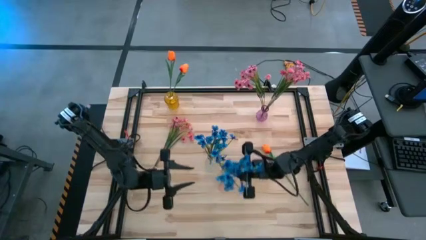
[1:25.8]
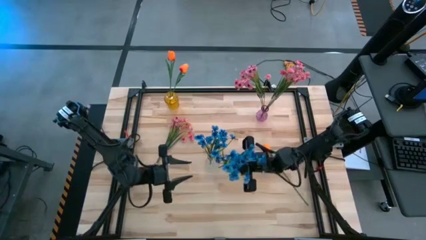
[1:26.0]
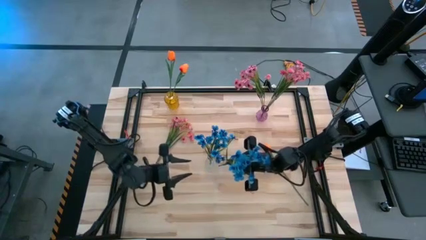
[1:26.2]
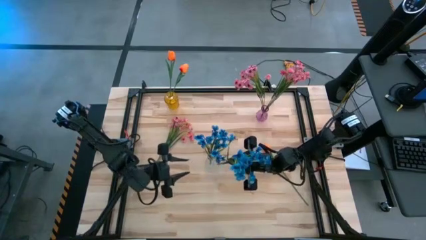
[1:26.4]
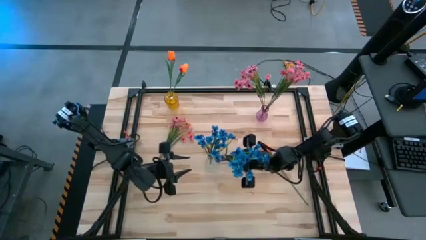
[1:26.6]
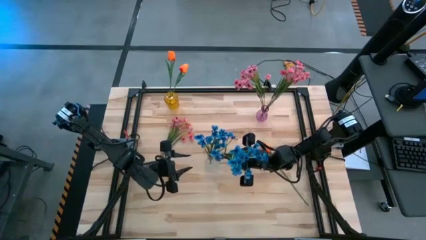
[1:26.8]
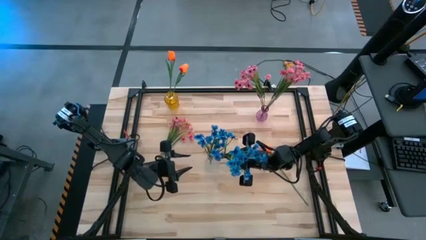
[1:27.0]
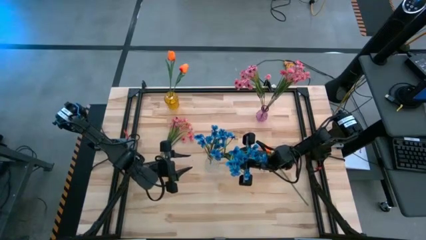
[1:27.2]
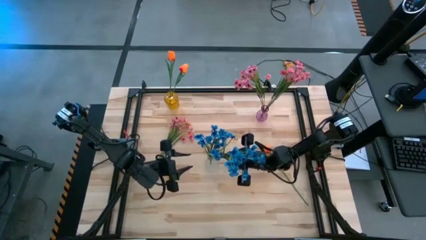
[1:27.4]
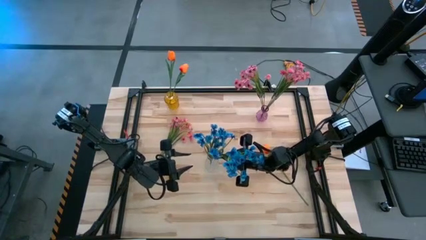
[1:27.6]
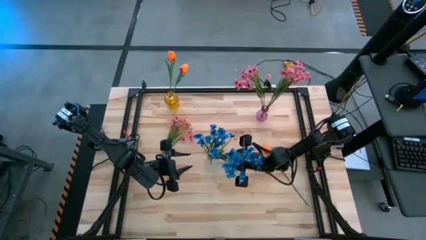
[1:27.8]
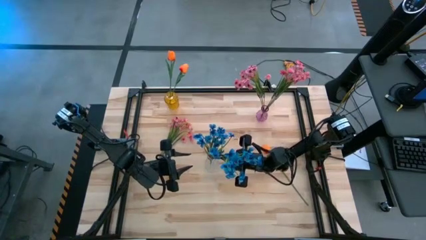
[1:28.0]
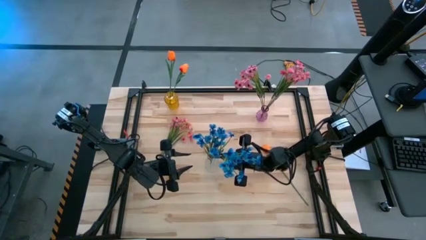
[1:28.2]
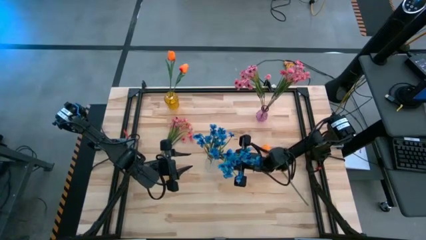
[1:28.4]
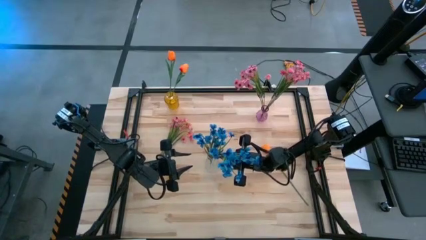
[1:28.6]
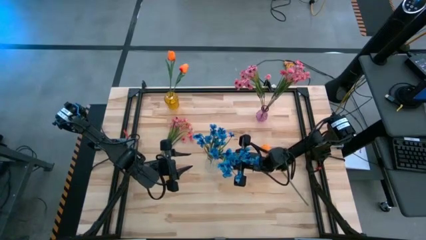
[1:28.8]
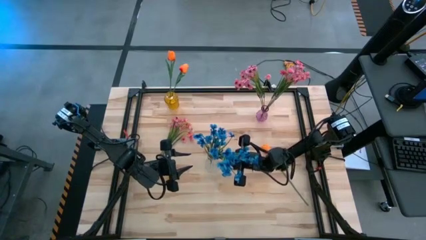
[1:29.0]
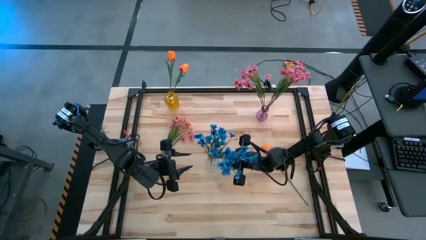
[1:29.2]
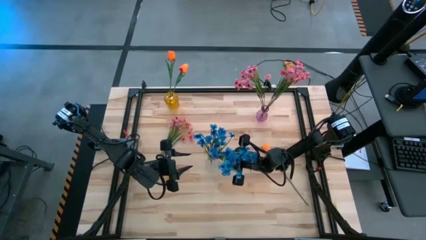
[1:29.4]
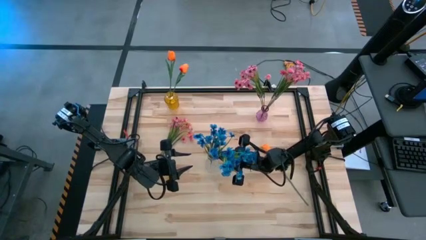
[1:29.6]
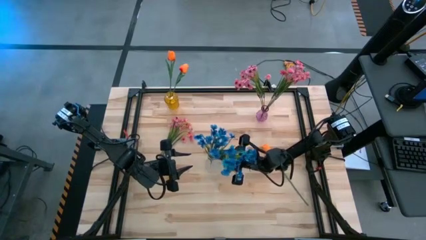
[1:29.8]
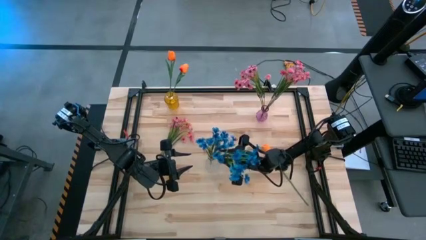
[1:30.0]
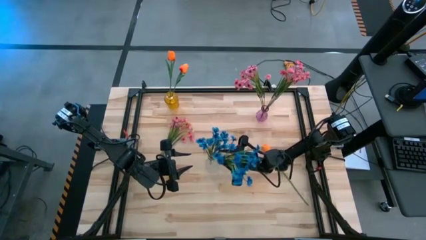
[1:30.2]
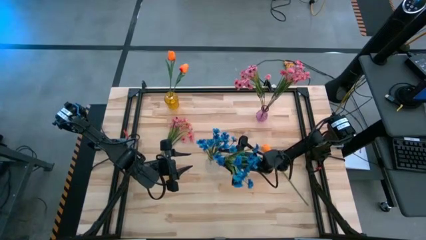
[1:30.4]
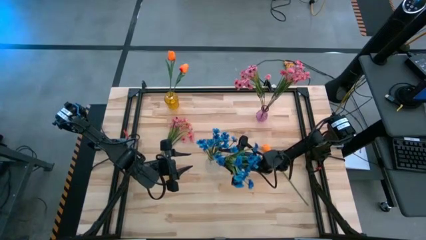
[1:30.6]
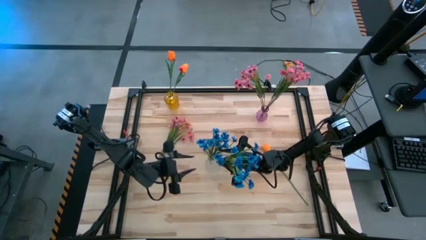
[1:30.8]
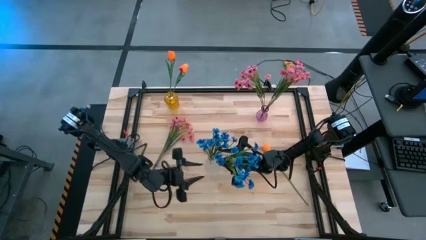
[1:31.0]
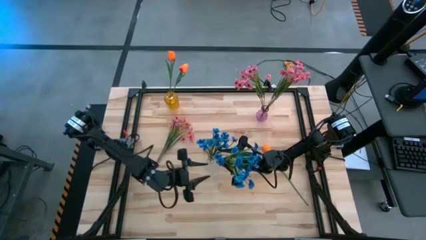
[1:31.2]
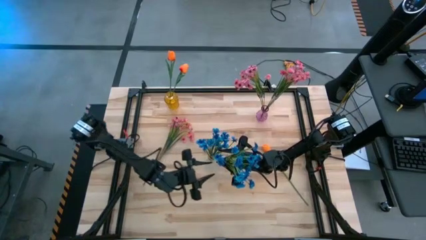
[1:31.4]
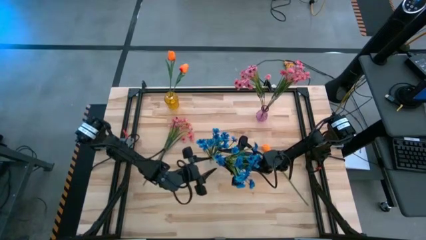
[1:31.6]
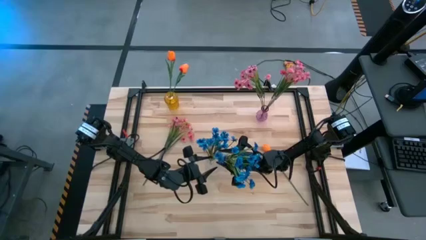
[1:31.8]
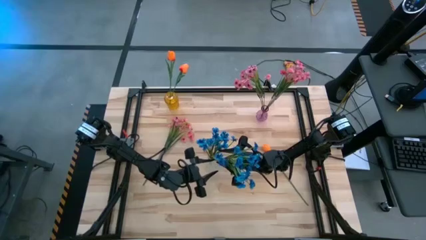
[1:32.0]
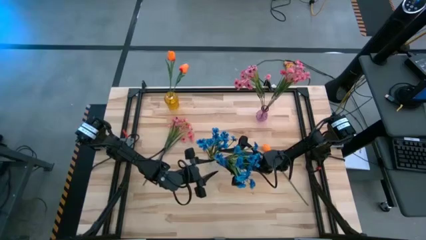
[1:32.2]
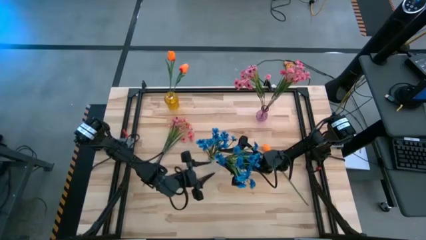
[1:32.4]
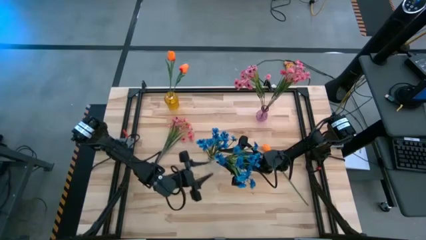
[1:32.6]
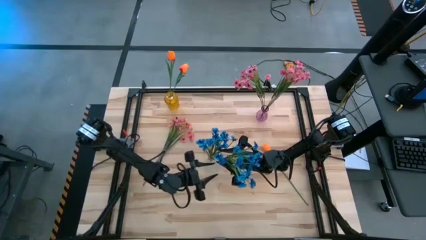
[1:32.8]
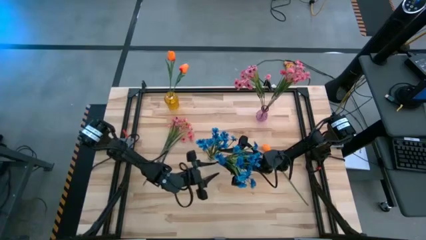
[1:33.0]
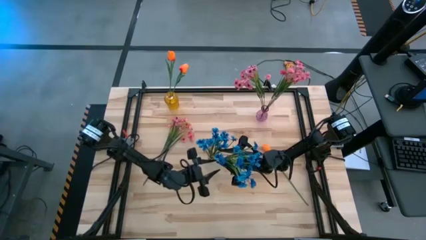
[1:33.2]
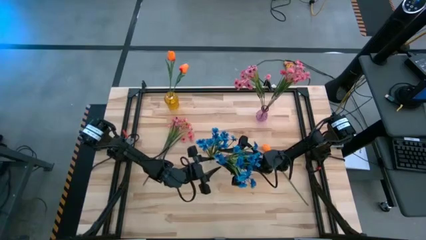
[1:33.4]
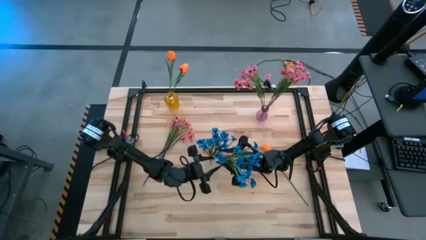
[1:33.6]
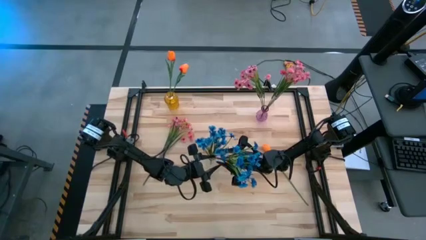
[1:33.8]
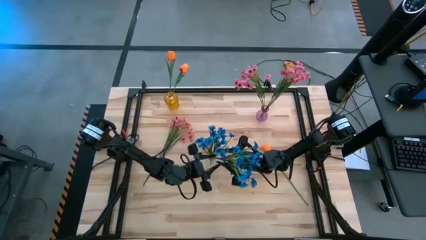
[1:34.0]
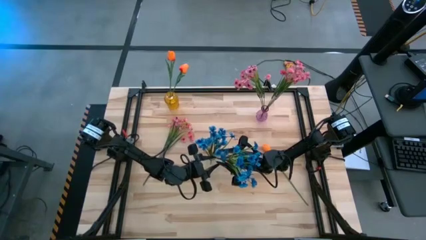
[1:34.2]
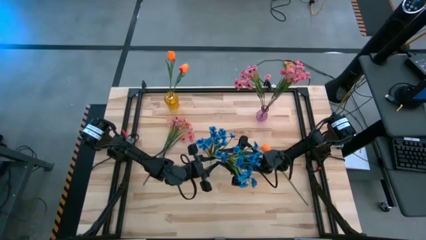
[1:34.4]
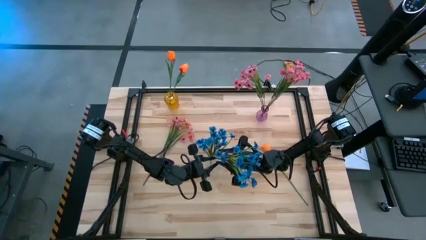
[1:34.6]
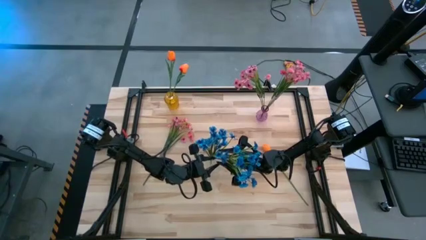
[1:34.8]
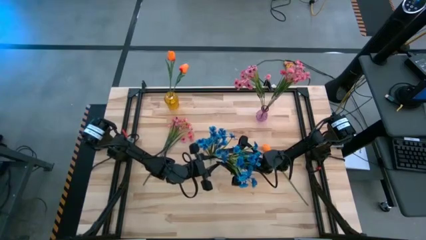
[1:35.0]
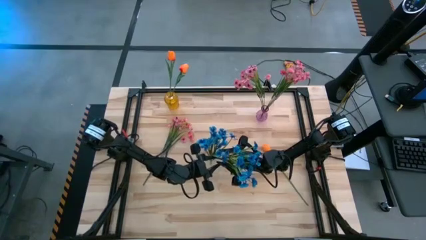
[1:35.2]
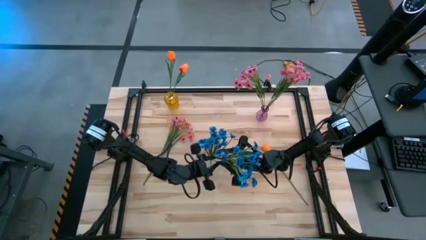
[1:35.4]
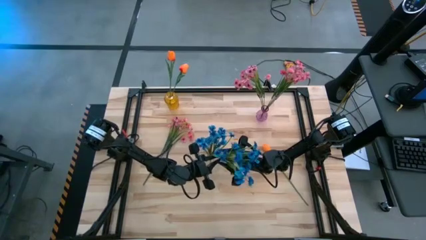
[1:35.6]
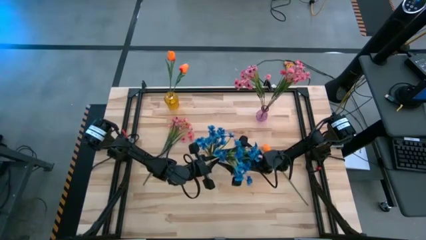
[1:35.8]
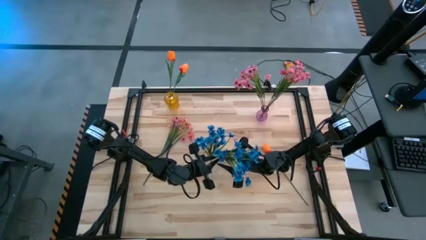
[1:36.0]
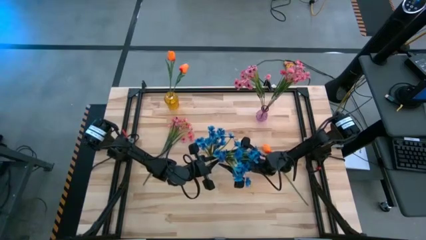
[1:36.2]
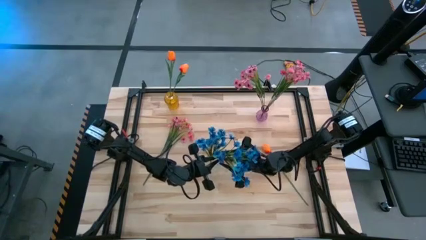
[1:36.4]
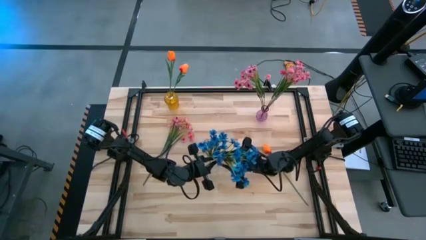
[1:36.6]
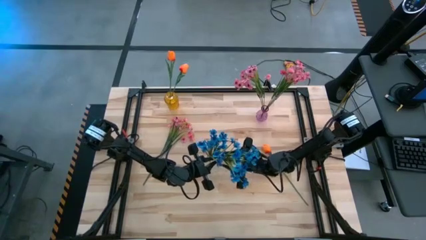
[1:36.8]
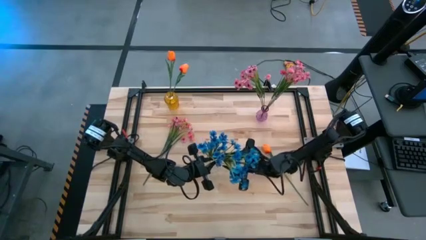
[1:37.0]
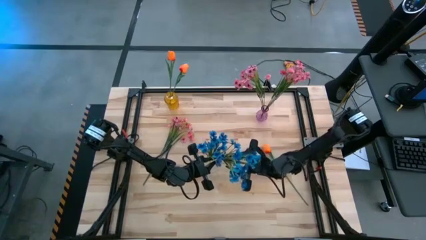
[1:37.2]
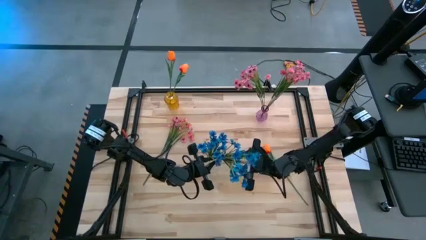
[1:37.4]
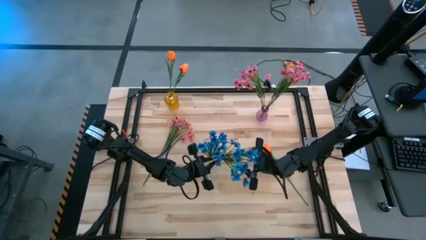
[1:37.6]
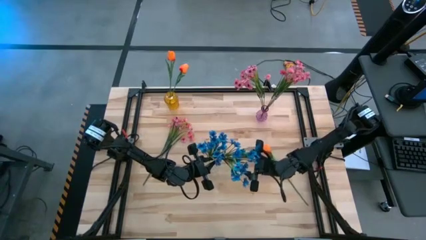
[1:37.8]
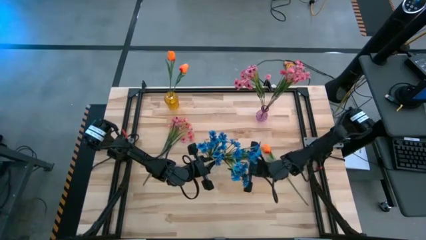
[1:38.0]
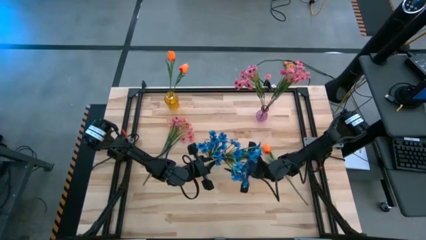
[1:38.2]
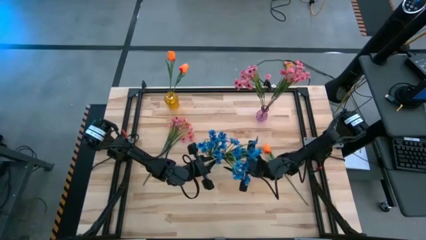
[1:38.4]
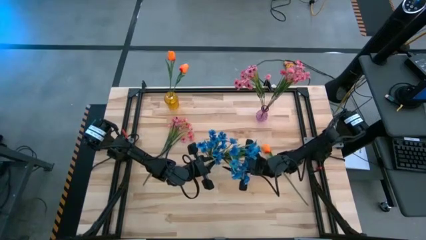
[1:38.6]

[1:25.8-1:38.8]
Task: Sort flowers into vase by color
Put the blue flowers into the transparent vase

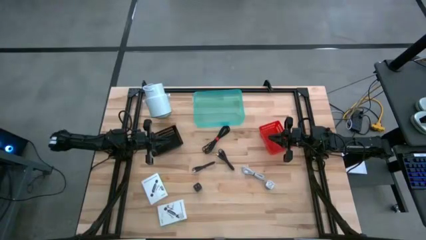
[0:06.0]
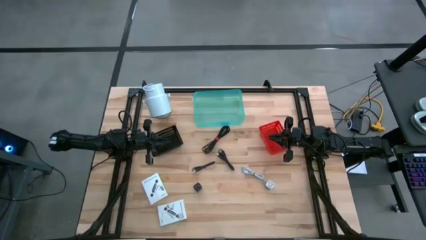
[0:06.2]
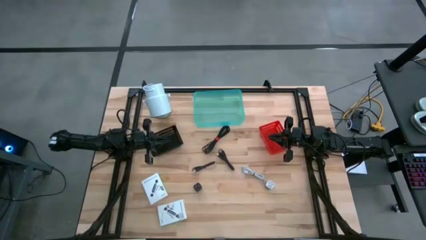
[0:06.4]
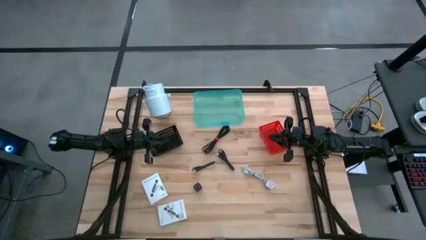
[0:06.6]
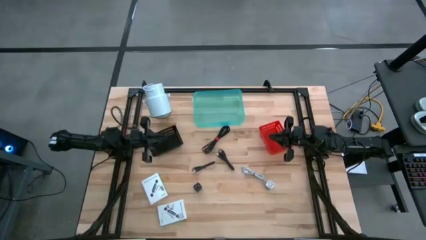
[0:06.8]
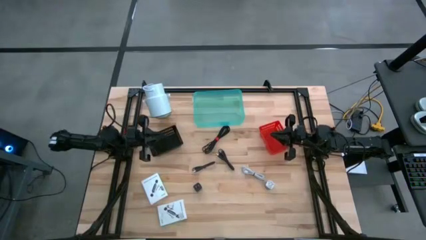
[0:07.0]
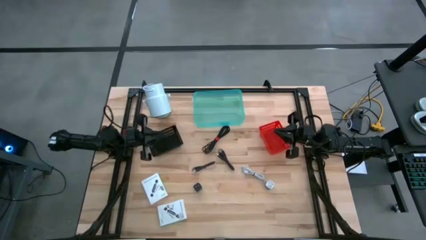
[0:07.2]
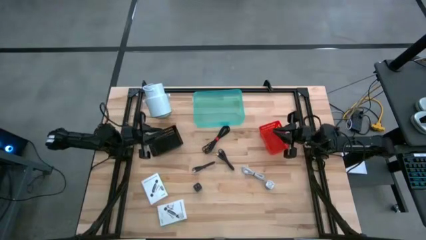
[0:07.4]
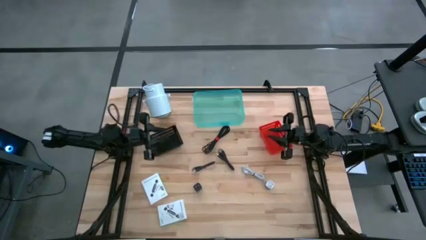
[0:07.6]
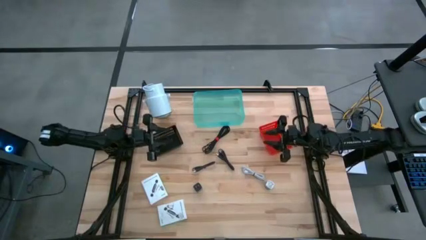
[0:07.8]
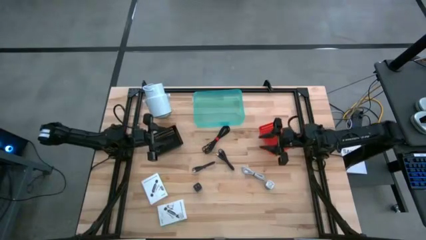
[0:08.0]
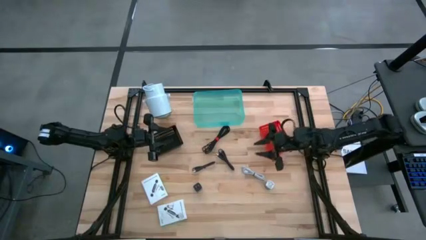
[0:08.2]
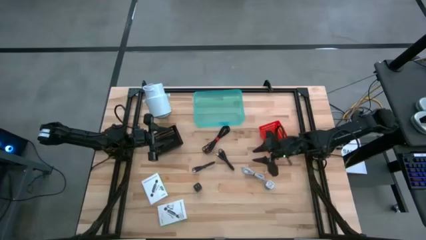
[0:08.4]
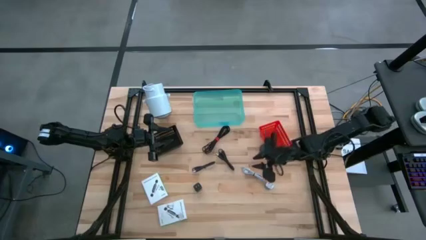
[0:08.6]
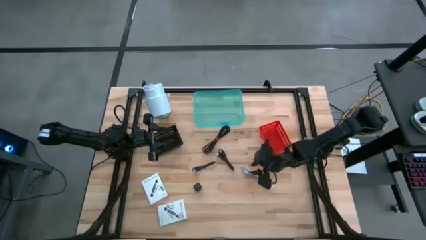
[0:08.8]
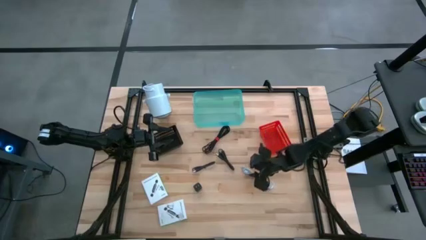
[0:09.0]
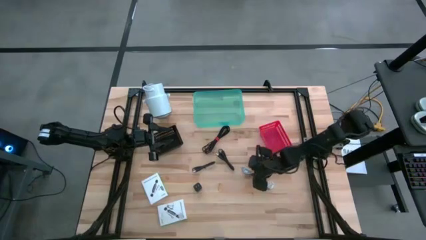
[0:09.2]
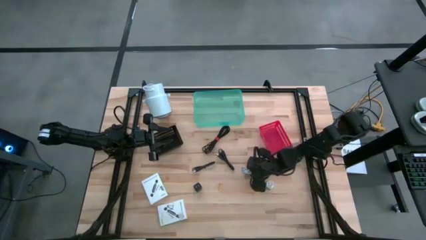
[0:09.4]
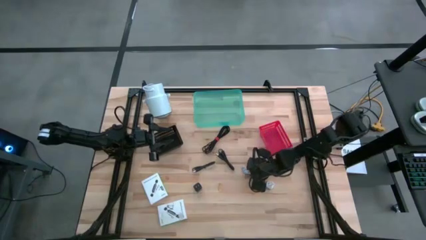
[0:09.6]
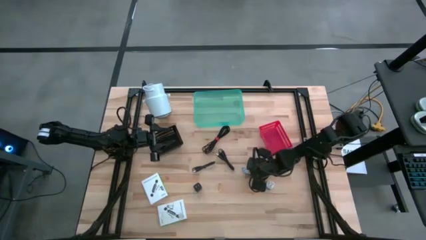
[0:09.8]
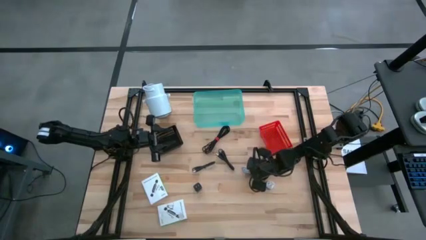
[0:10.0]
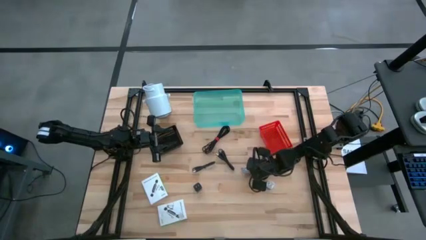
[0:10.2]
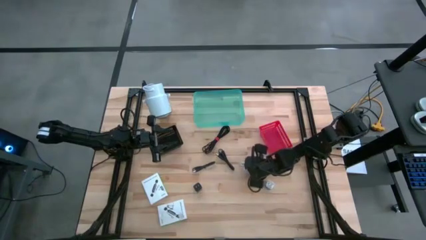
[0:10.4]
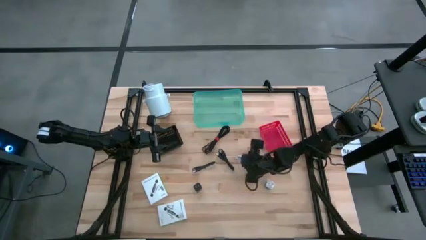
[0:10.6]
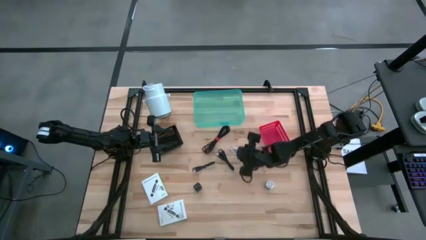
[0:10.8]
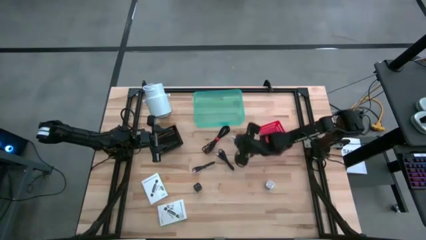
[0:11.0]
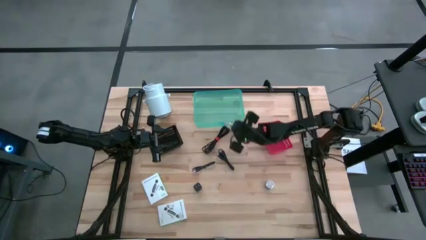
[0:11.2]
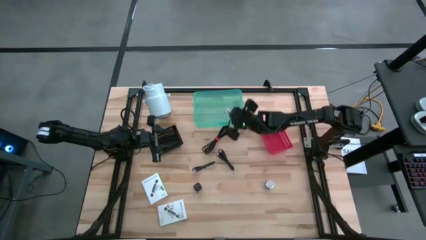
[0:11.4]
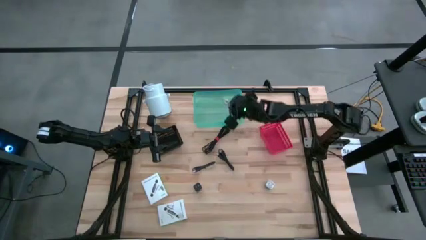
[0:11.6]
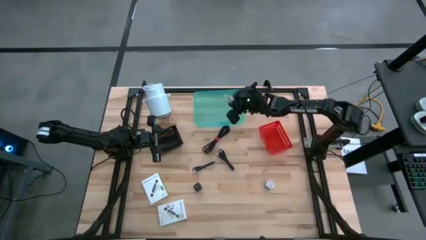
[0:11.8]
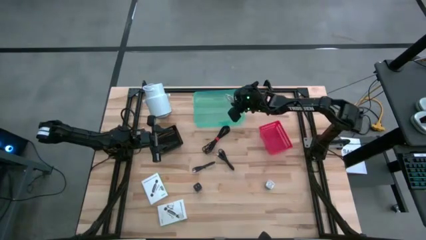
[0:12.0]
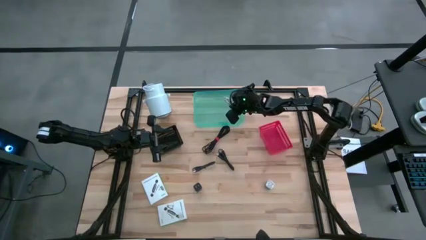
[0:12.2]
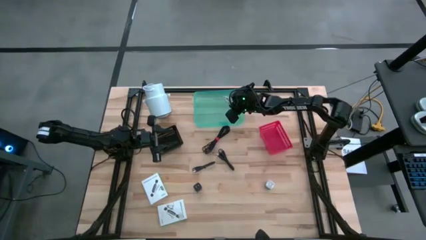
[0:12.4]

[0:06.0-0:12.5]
Task: Pick and place items into bin
Put the white charger cable into the blue bin
